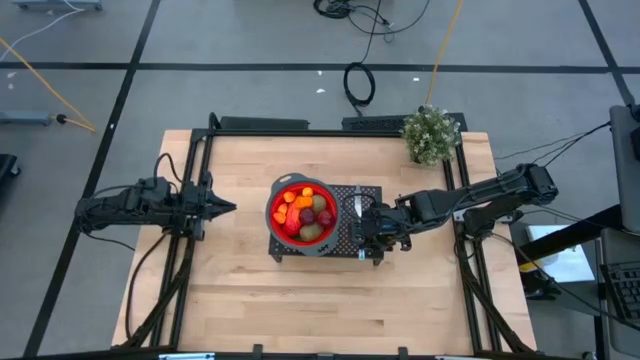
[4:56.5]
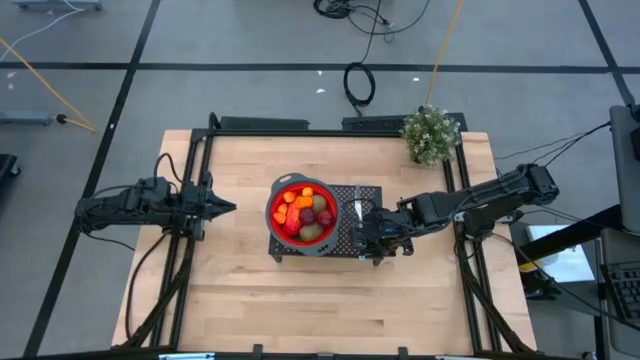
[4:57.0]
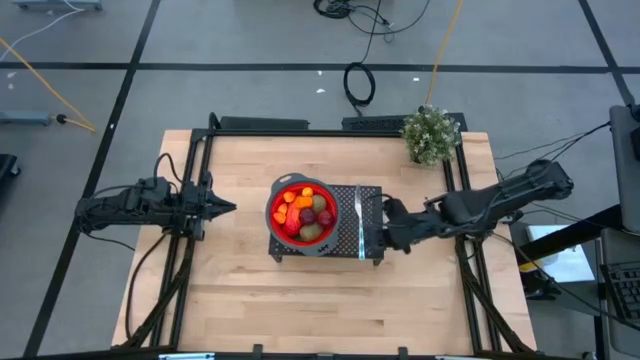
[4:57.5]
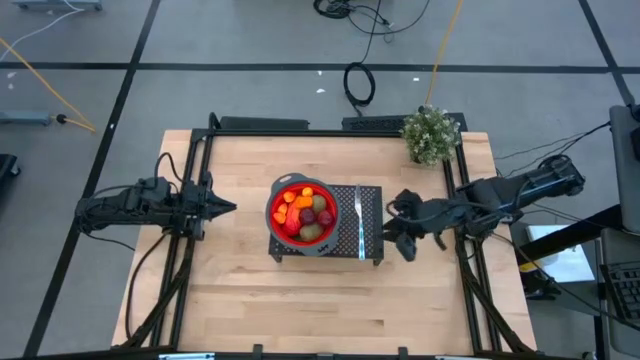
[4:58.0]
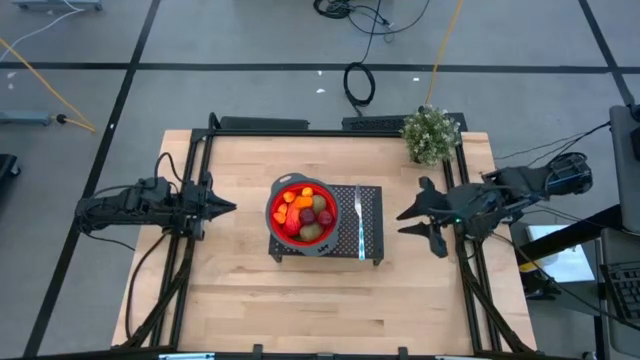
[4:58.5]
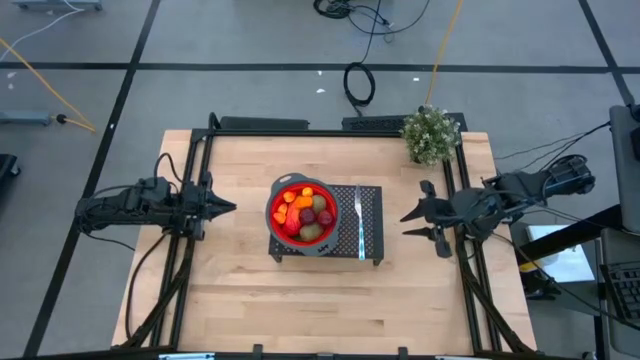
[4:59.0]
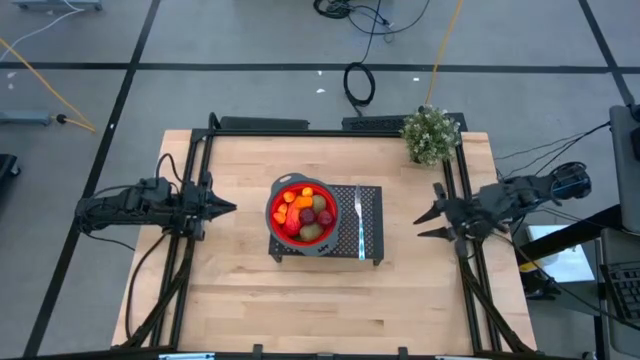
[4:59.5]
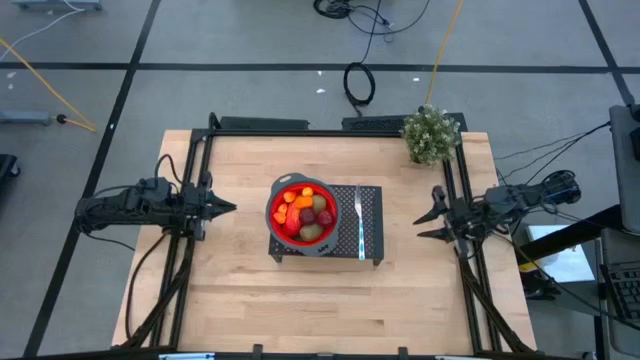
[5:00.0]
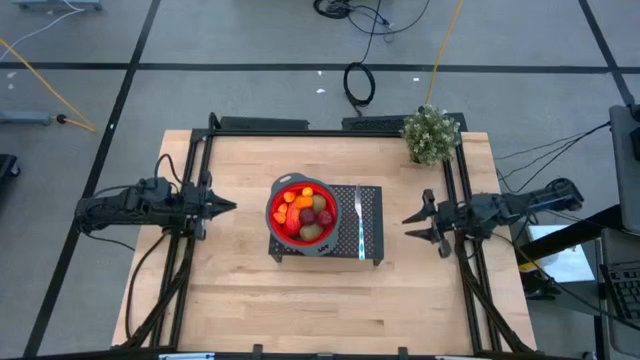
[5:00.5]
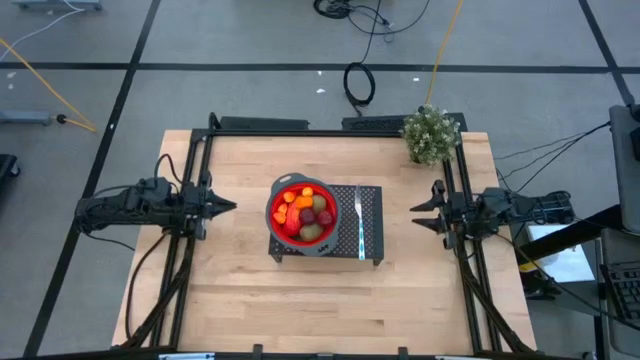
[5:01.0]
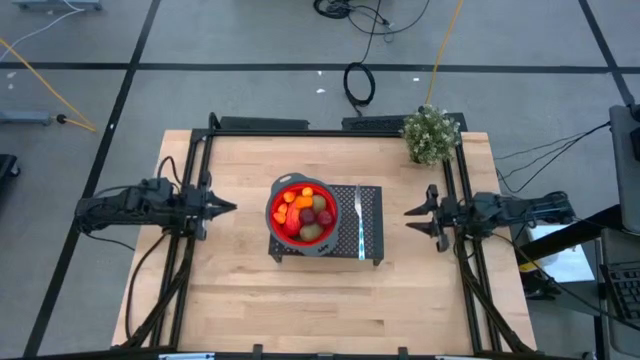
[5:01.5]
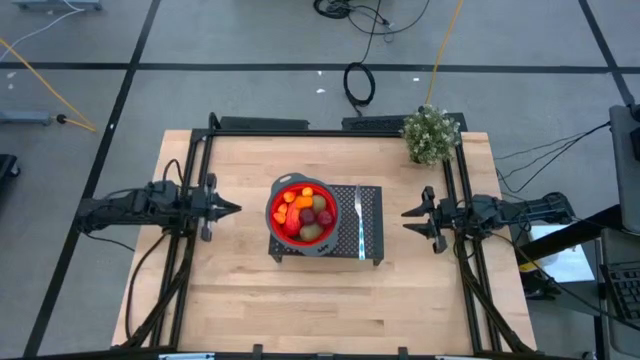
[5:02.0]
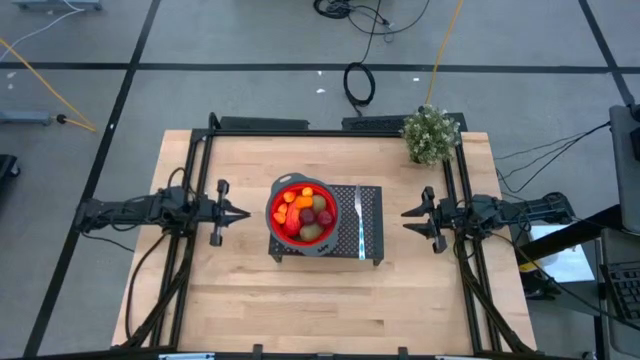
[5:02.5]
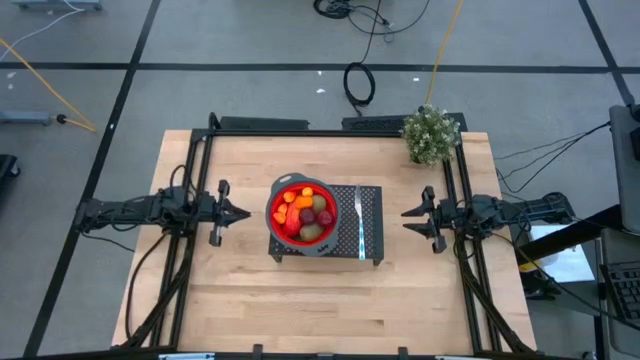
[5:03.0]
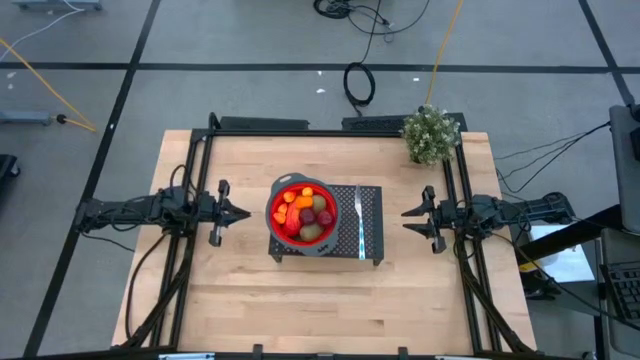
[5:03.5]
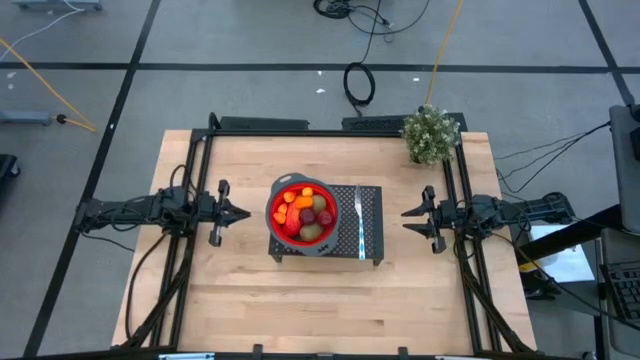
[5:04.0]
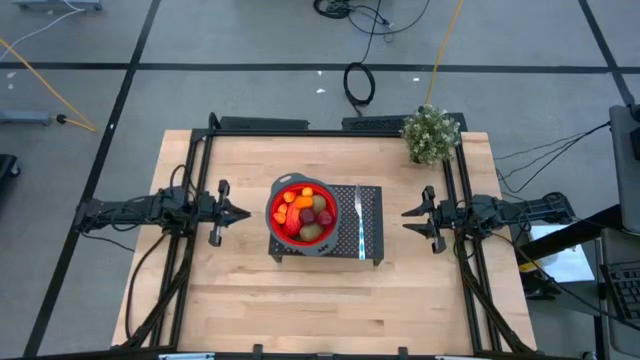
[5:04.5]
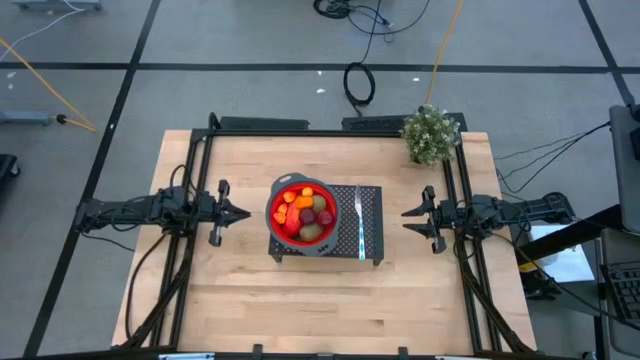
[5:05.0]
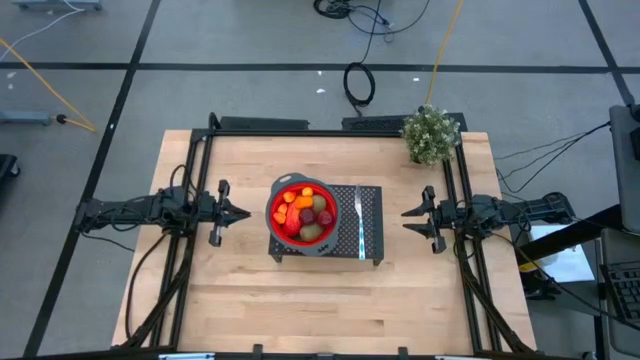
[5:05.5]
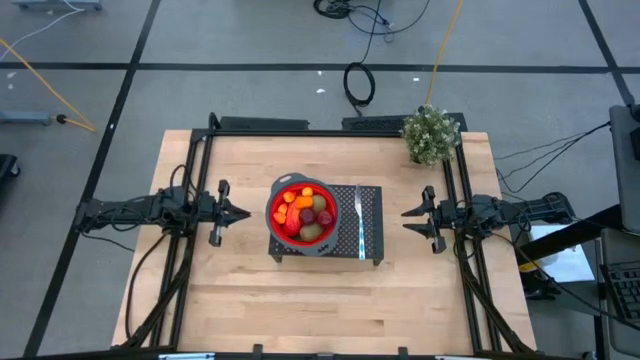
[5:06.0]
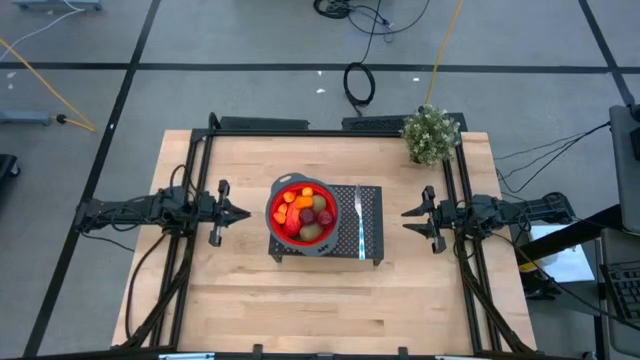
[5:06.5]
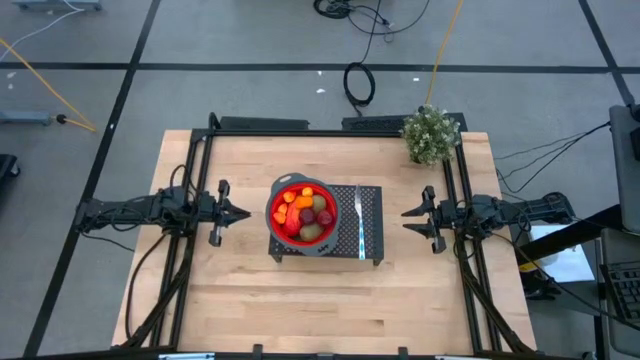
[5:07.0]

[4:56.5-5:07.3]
Task: Pick & Place Fruit
Return to Home Position

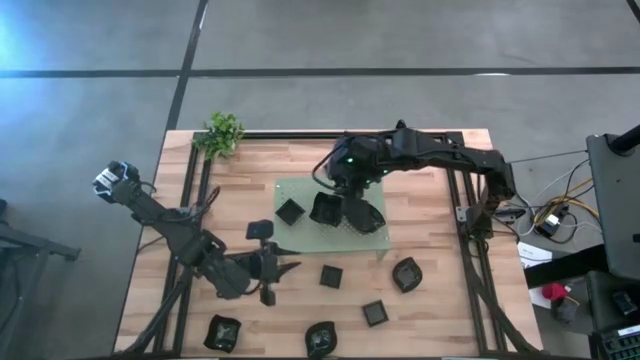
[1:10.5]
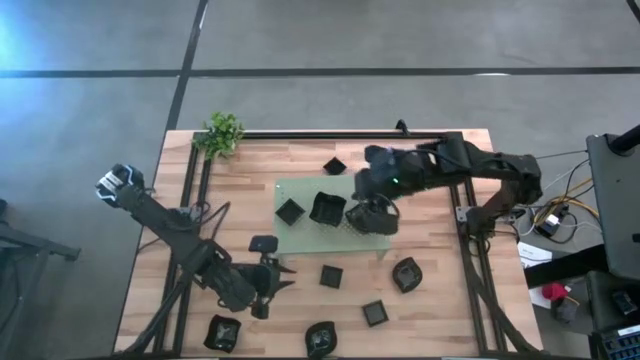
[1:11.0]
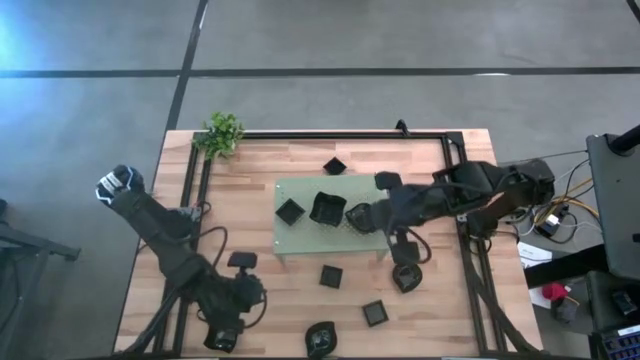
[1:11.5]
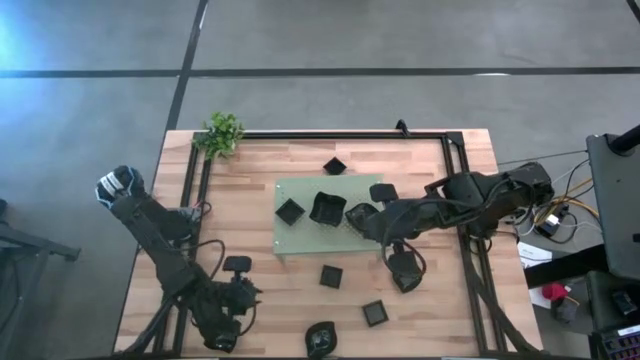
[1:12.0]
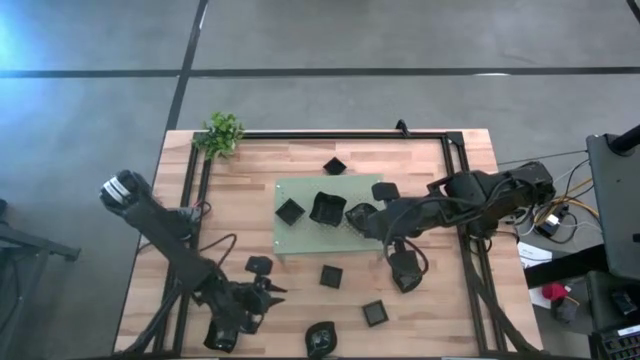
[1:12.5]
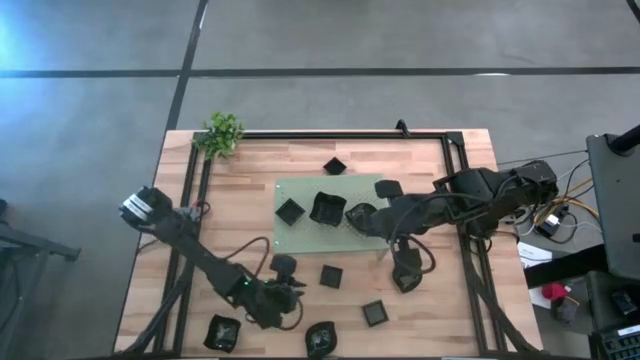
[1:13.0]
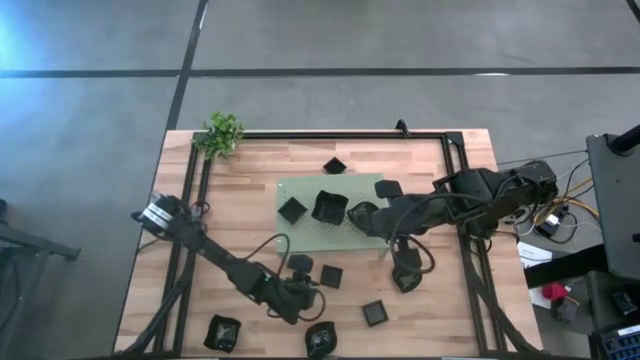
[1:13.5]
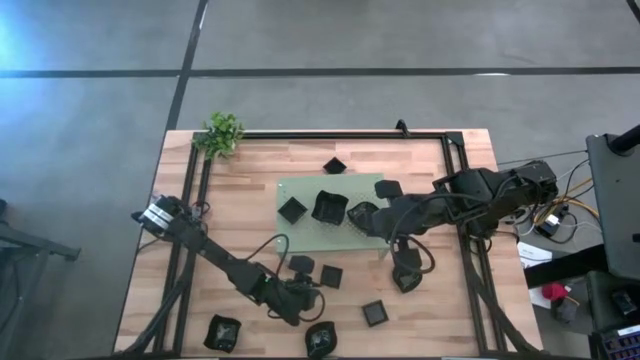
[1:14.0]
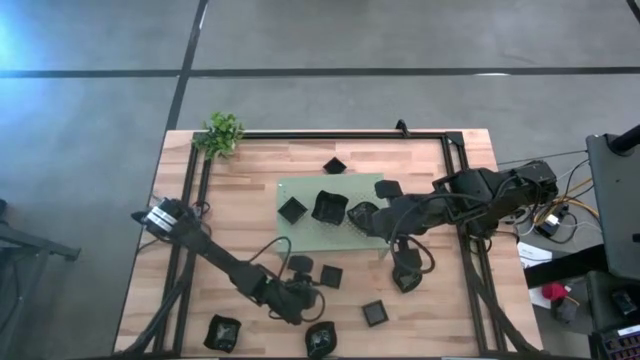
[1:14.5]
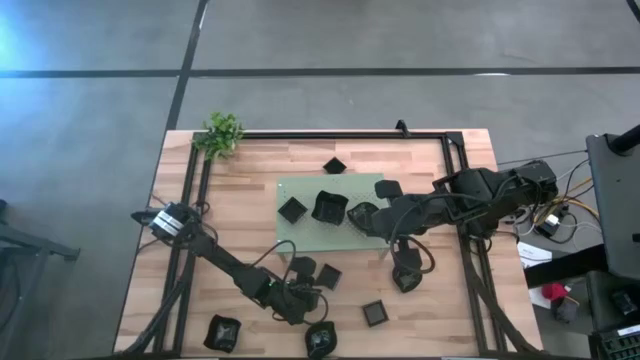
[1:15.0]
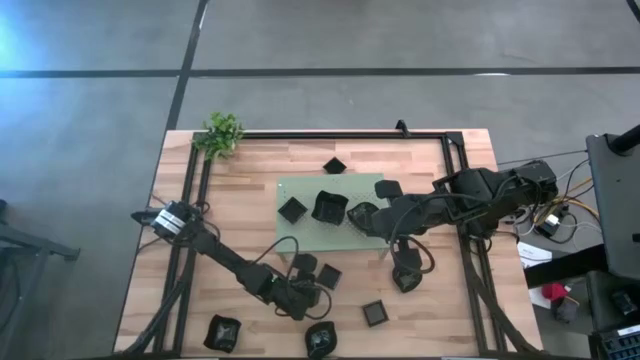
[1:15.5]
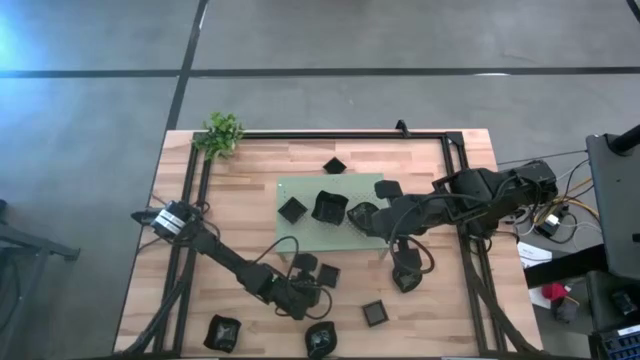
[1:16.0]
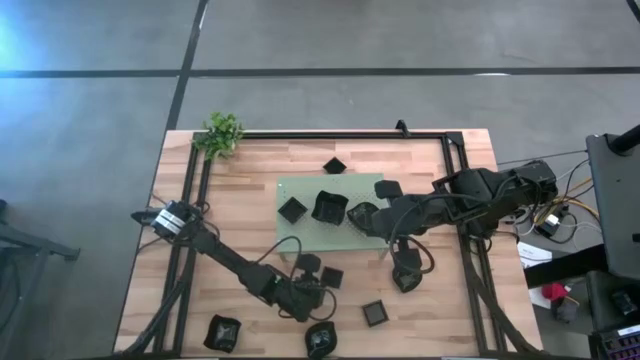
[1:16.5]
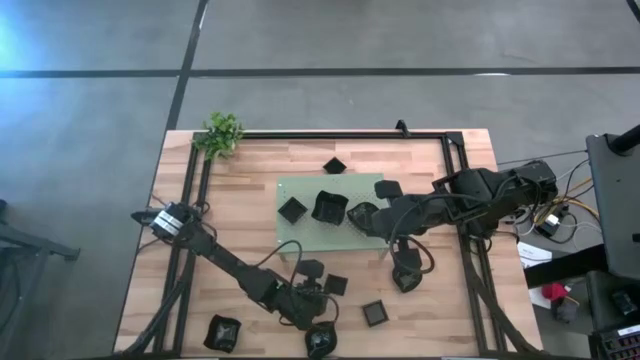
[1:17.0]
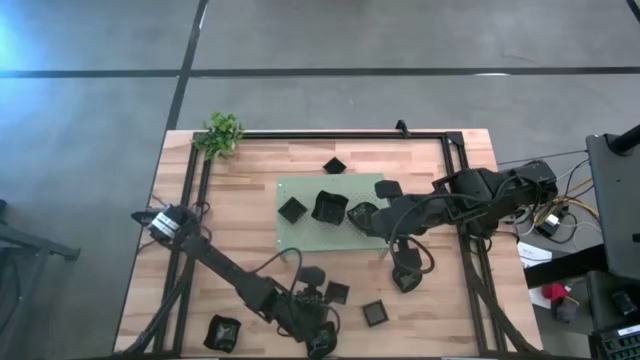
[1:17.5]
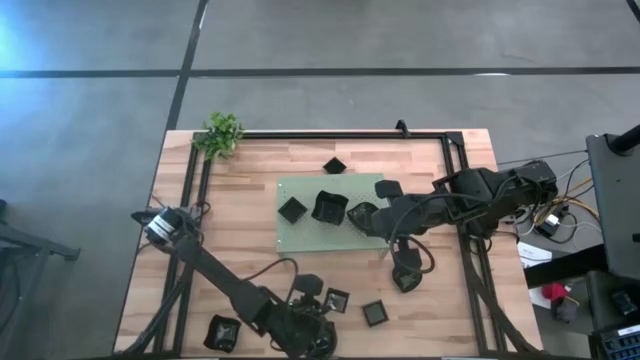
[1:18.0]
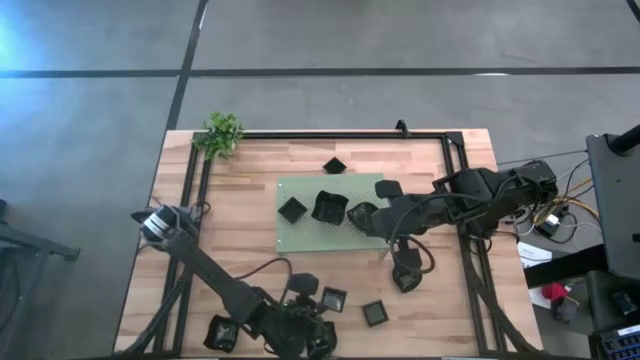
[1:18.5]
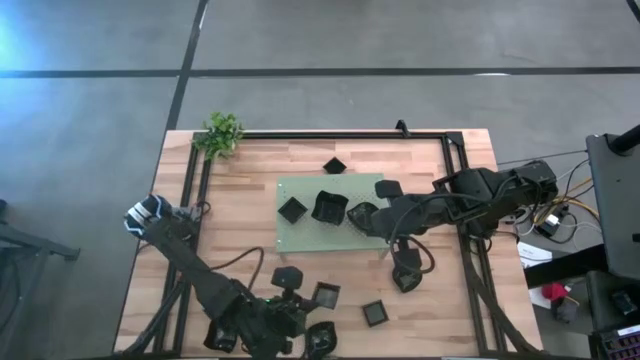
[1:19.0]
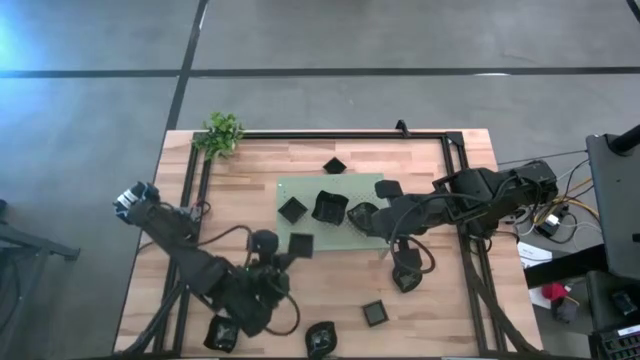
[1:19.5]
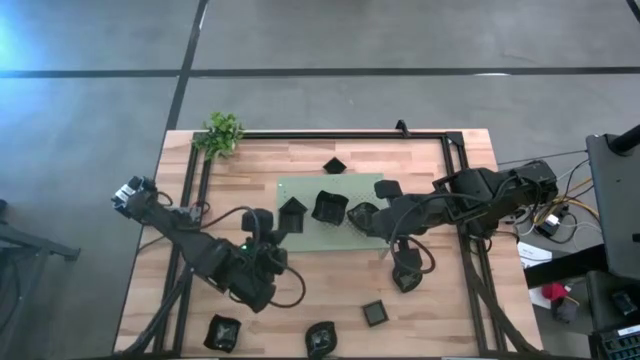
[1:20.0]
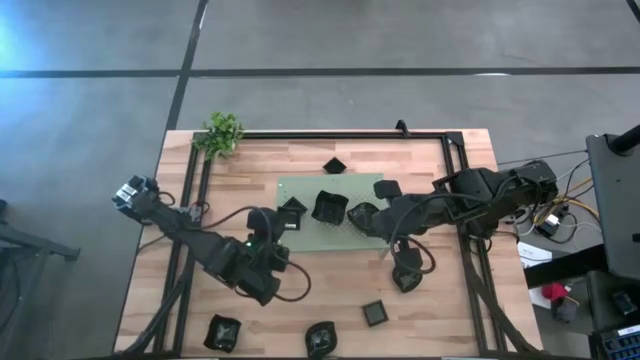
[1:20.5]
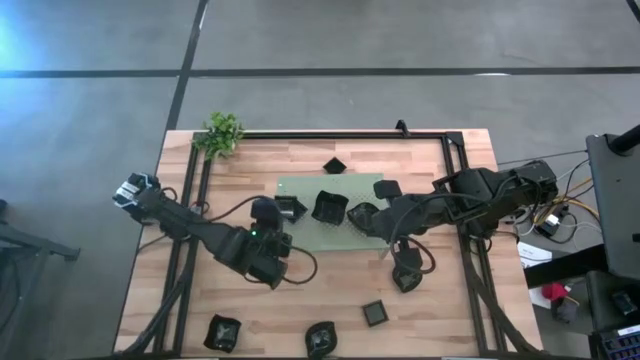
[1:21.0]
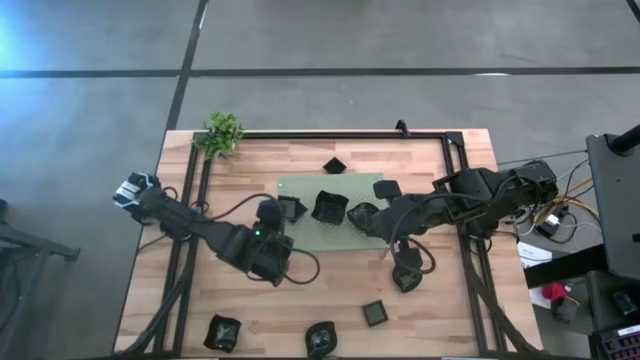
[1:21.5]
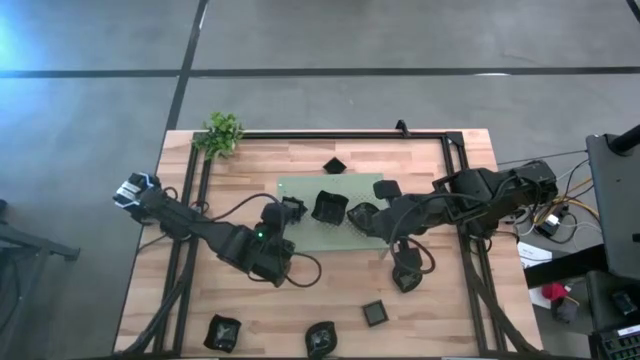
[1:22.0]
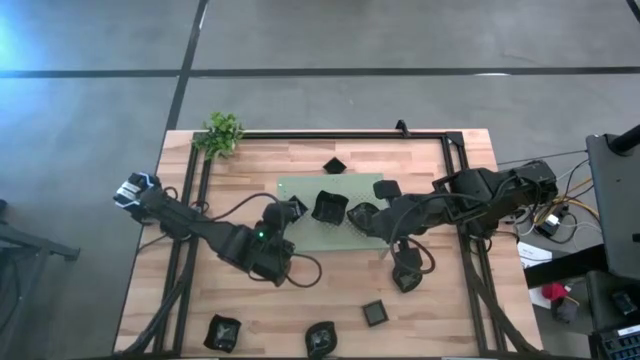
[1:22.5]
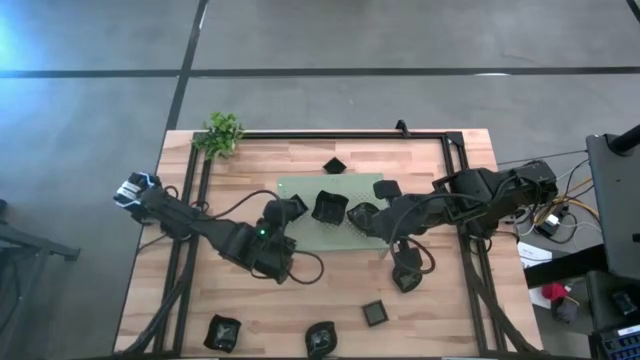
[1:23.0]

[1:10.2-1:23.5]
Task: Pick & Place Mini shaped plates
Stack the square plate on top of the square plate on the shelf
